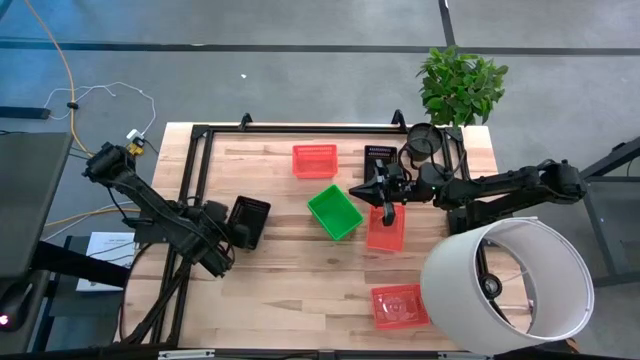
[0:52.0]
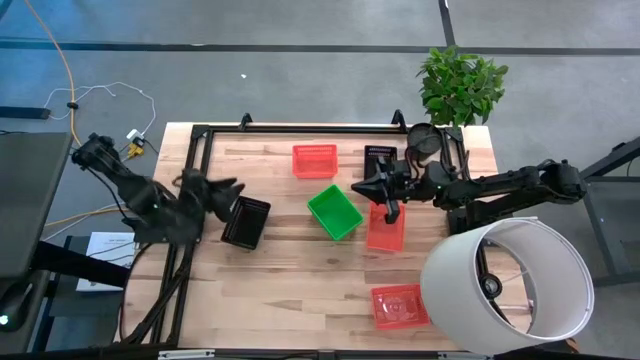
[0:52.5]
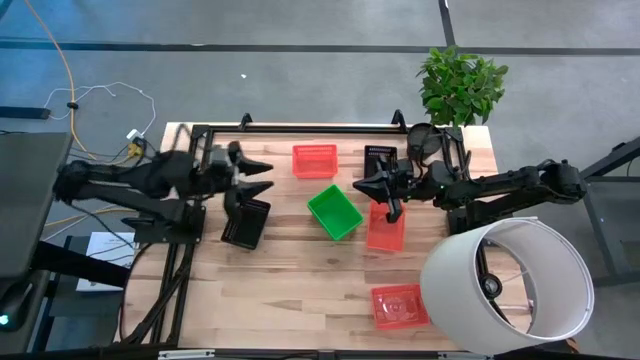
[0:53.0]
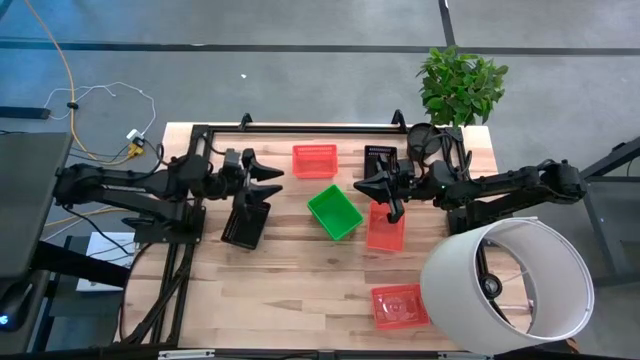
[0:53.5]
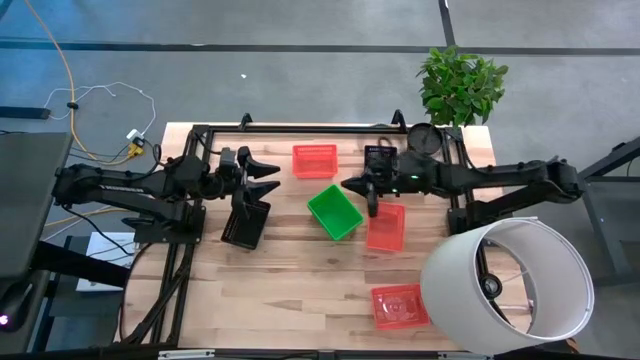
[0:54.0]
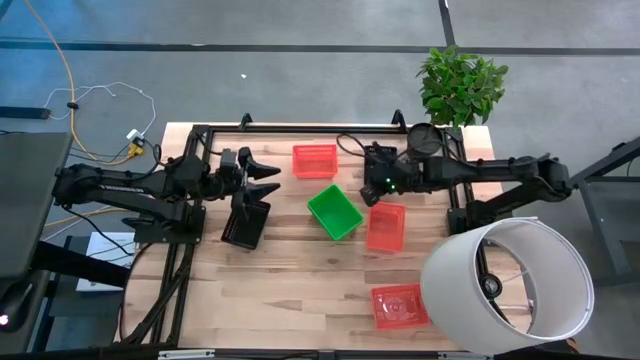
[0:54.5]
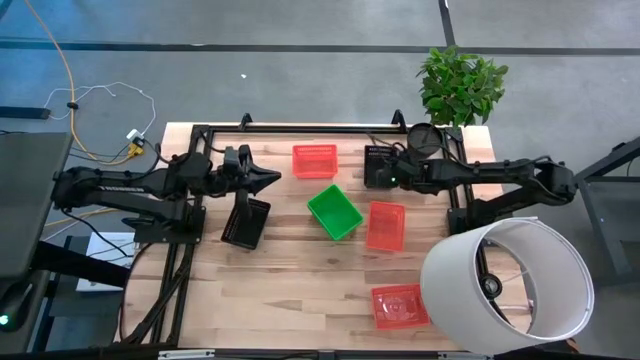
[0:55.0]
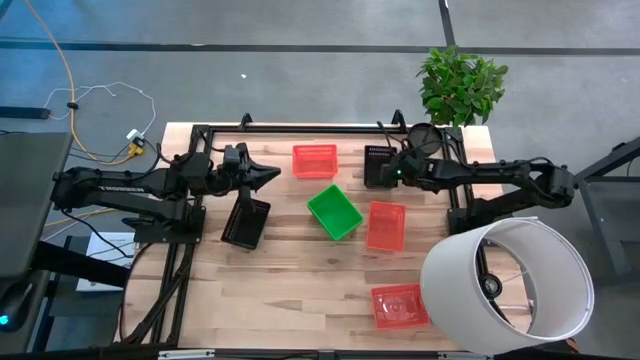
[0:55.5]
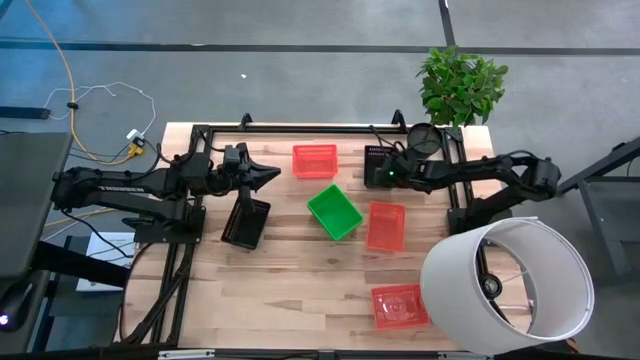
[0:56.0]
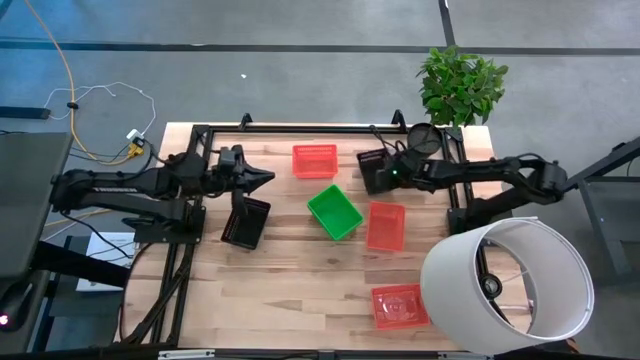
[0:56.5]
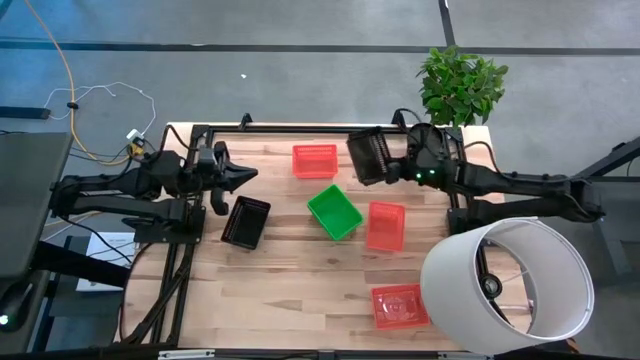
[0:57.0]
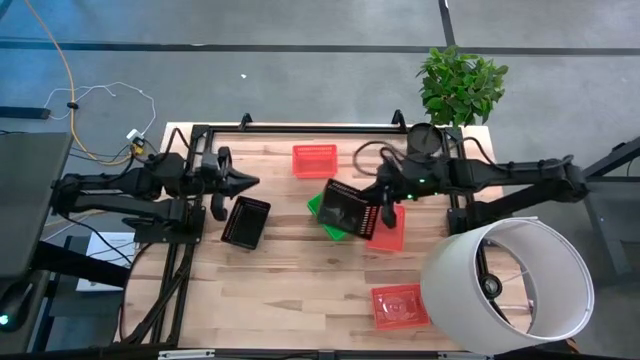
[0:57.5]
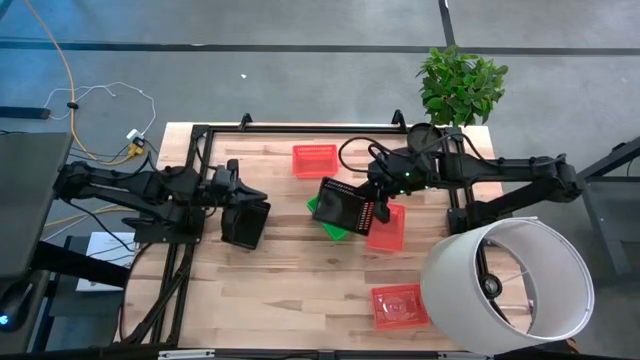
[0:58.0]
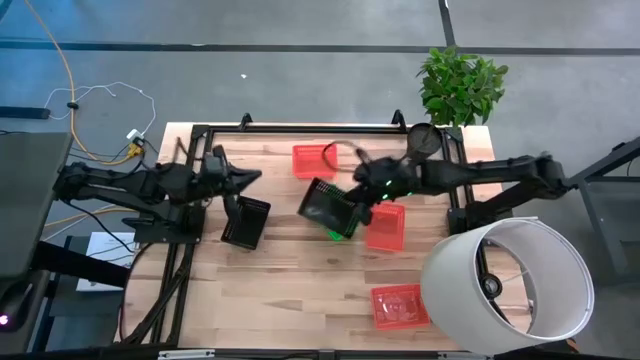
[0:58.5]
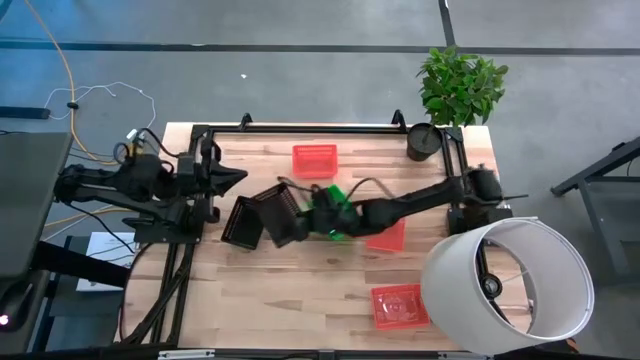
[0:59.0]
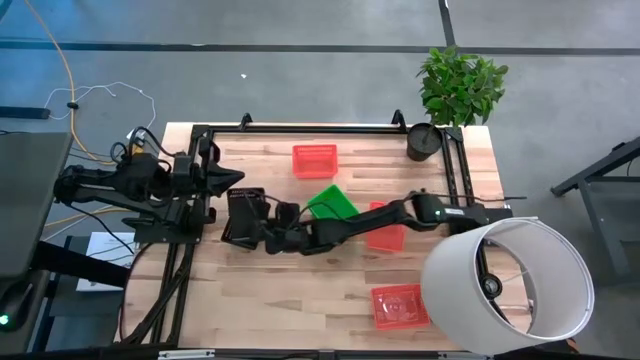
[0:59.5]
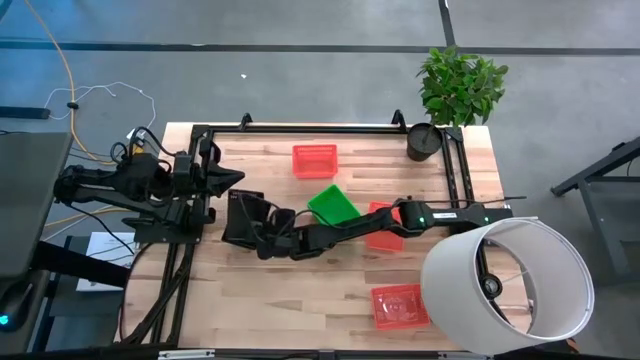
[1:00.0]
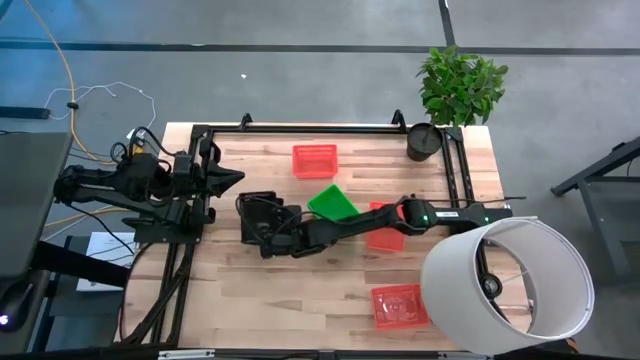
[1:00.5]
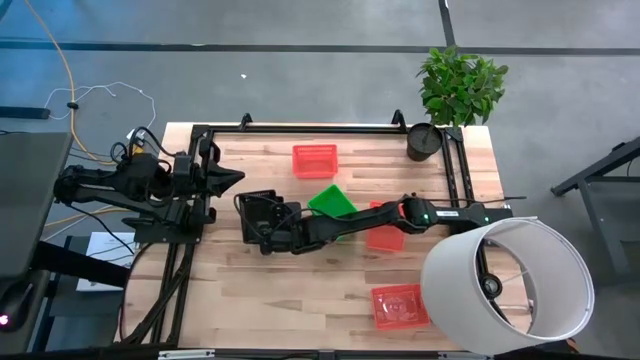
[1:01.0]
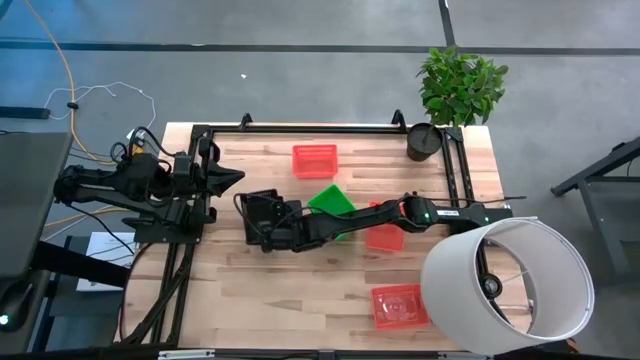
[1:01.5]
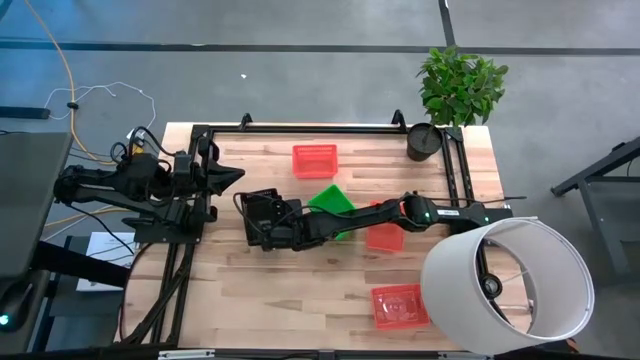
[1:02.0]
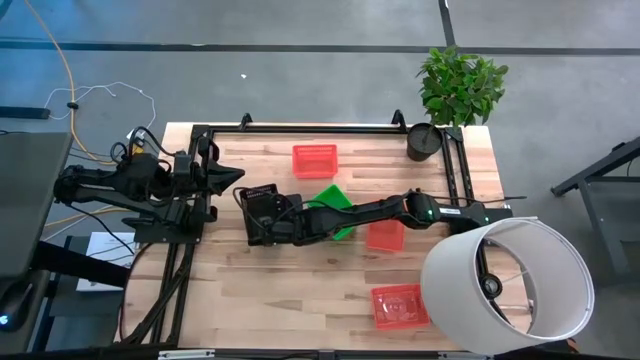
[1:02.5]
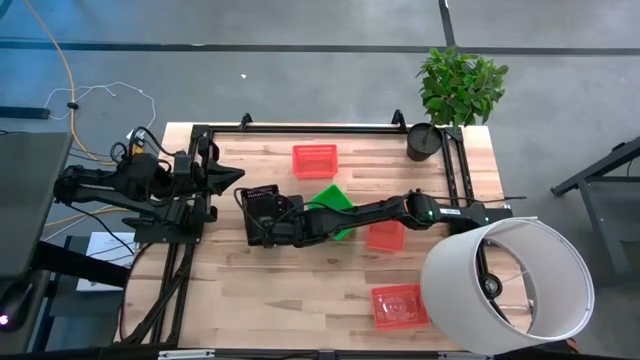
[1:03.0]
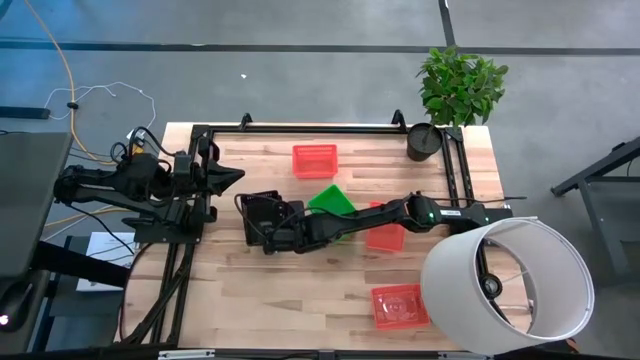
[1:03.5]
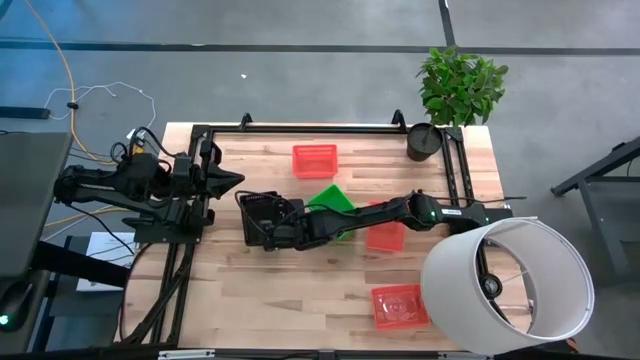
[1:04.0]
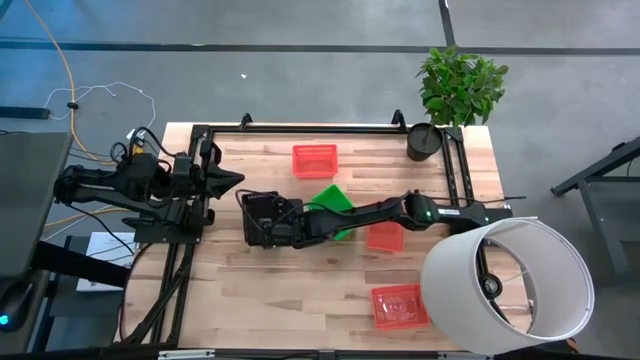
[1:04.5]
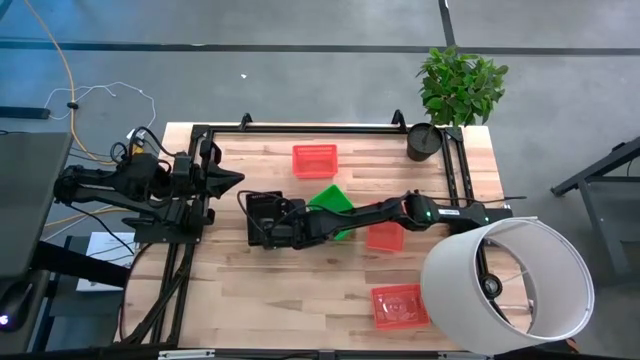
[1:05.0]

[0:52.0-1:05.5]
Stack the black basket on the black basket

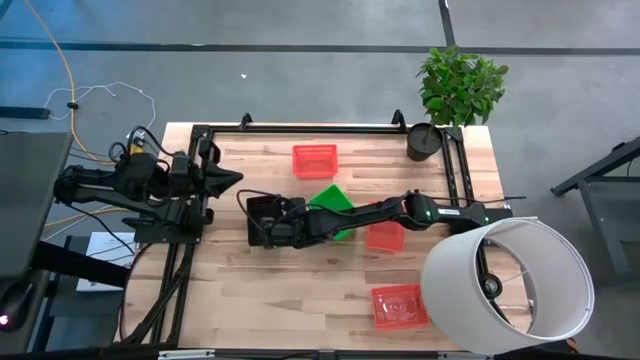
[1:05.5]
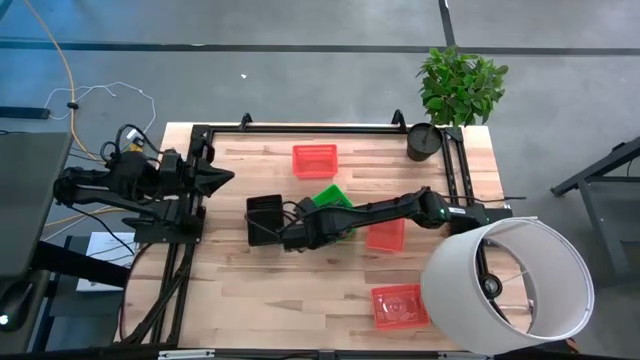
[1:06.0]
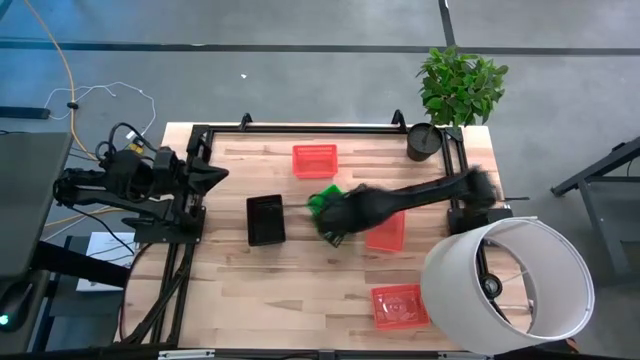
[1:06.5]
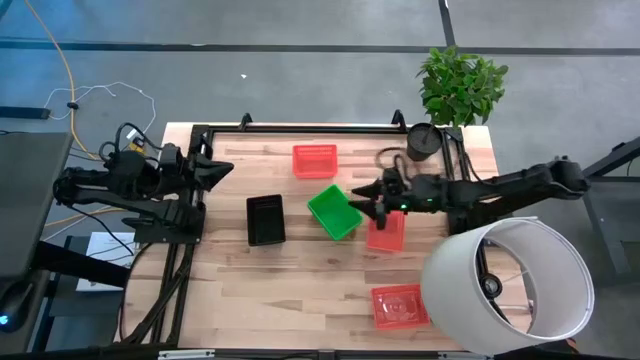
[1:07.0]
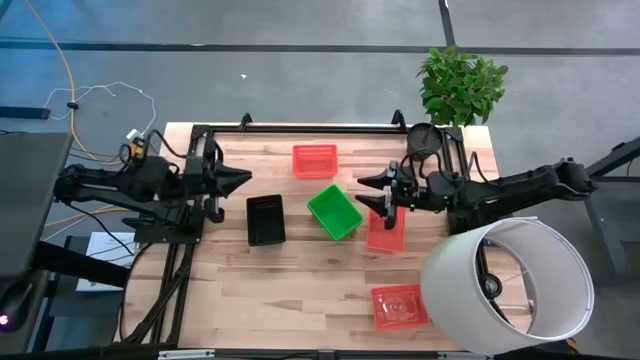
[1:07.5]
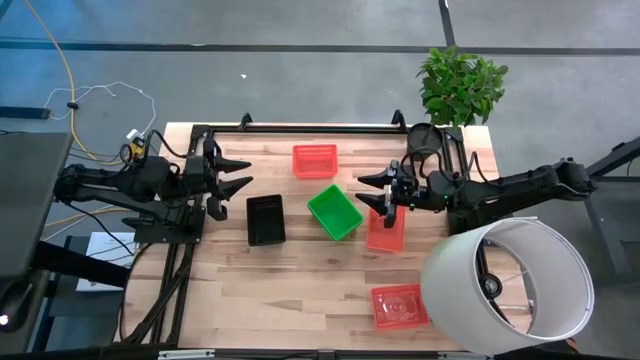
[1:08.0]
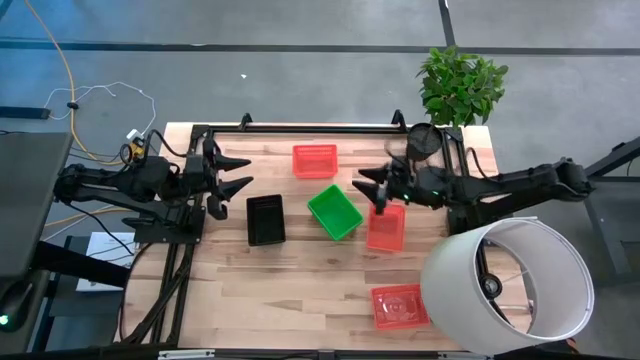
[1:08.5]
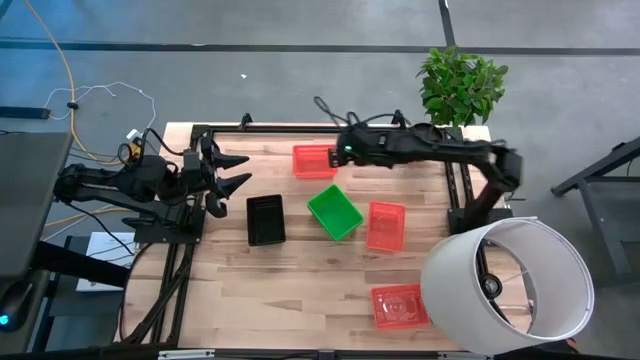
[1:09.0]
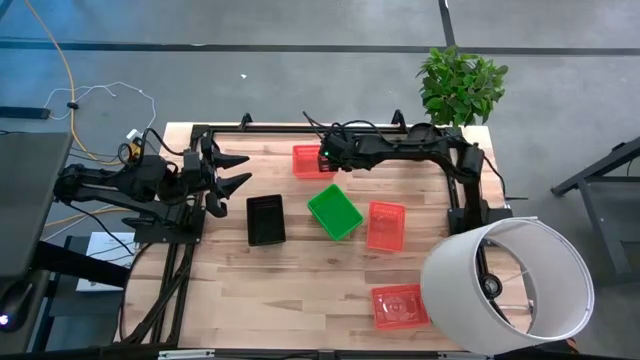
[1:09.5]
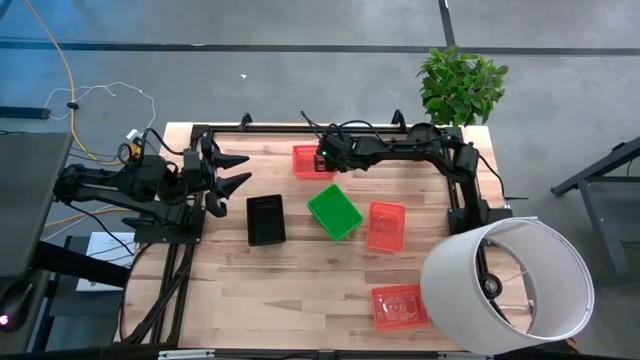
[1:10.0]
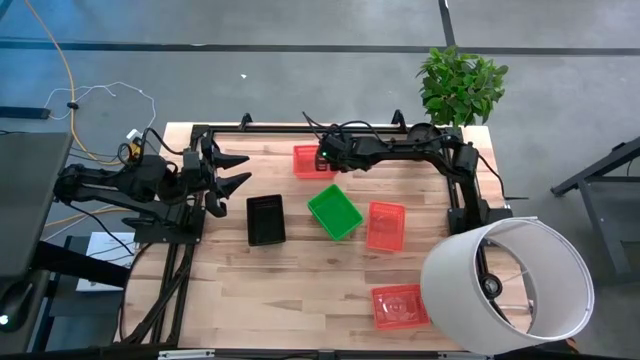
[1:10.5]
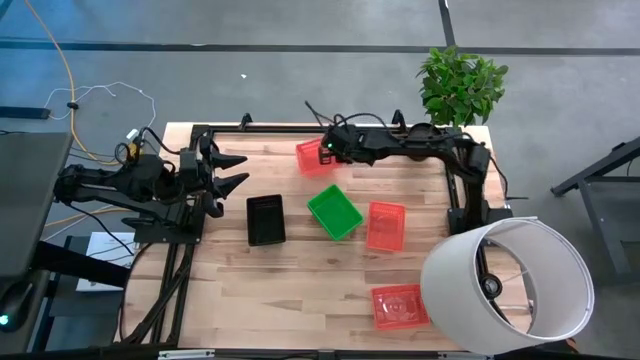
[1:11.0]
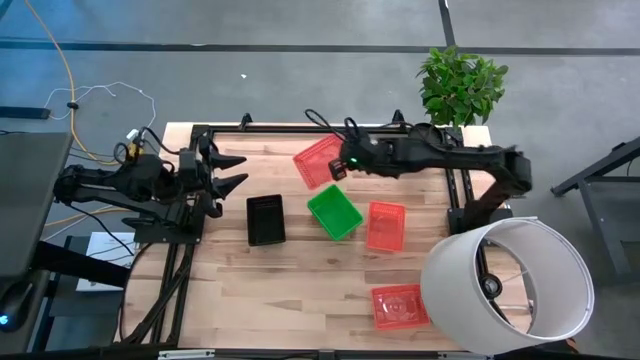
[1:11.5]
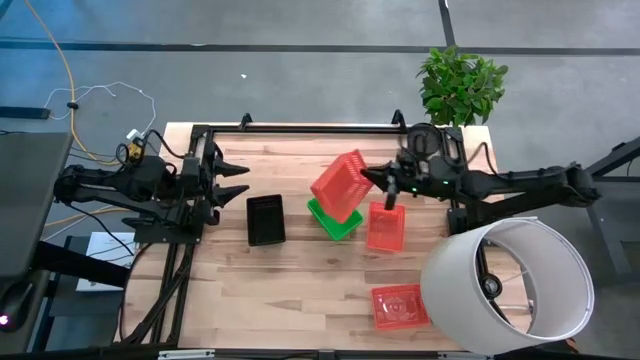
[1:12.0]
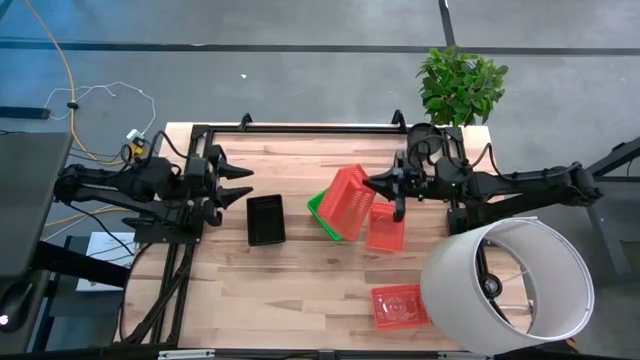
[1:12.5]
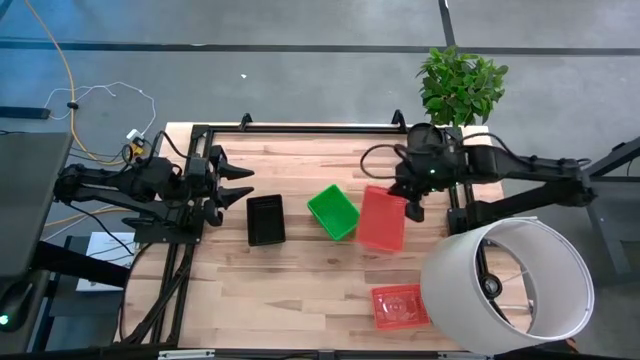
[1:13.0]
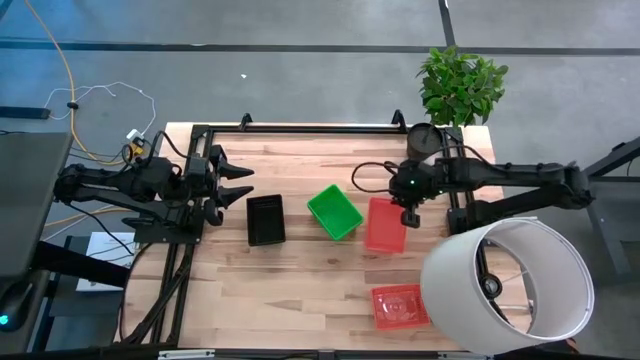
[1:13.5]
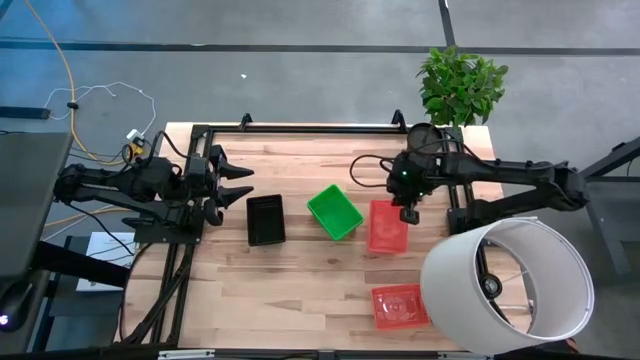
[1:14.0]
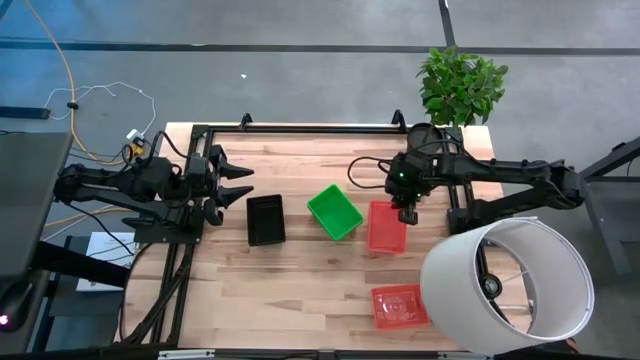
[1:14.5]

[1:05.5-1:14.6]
Stack the top orange basket on the orange basket
